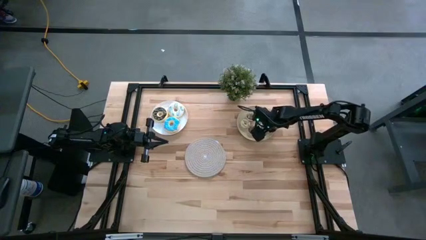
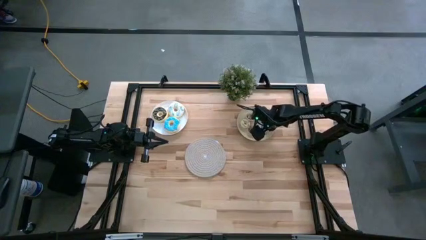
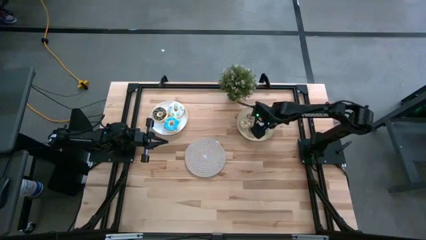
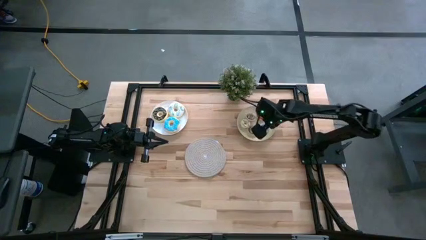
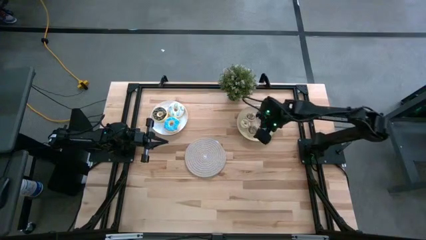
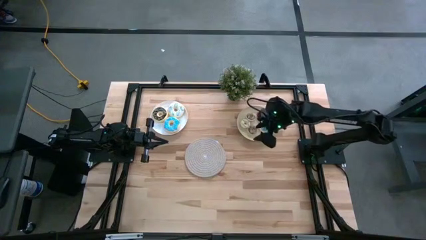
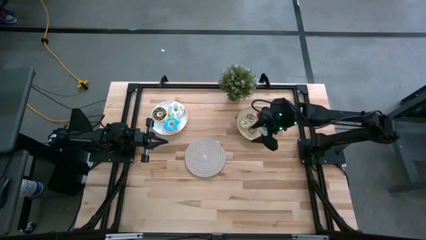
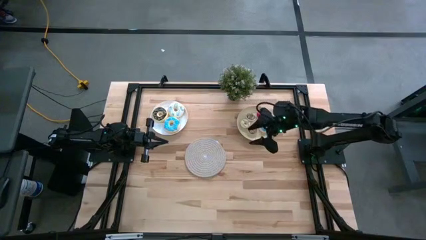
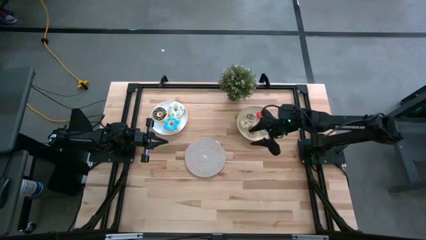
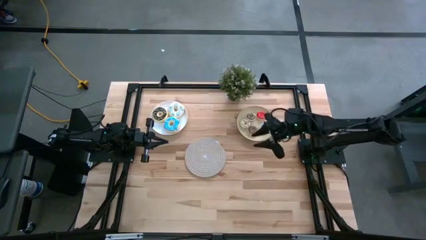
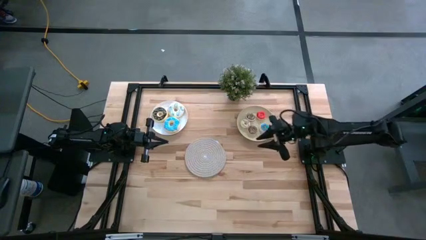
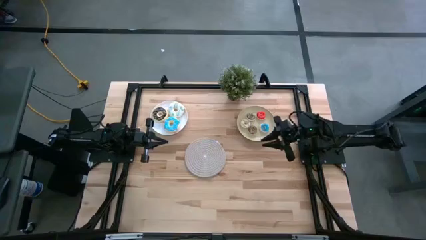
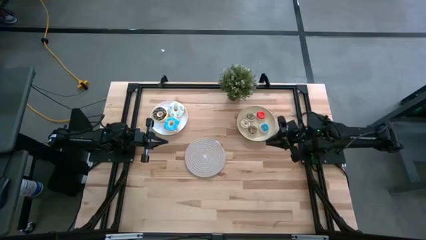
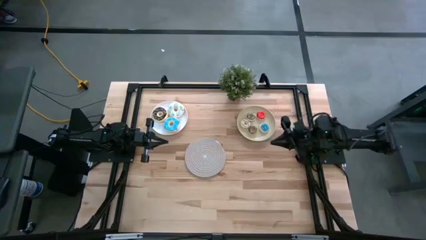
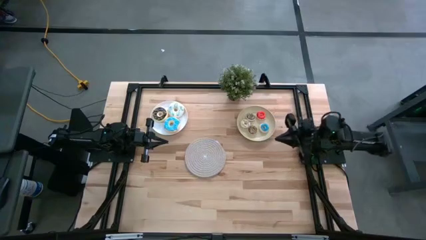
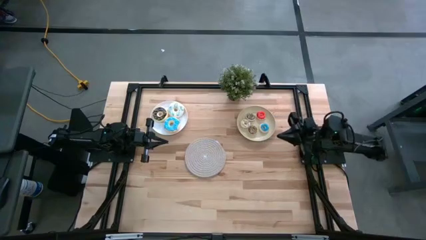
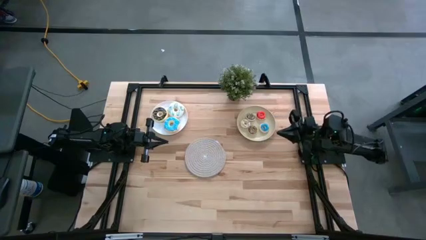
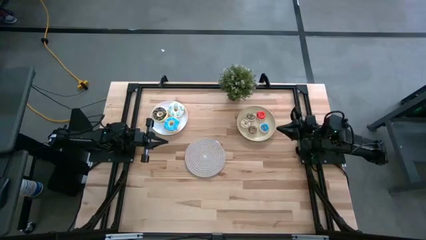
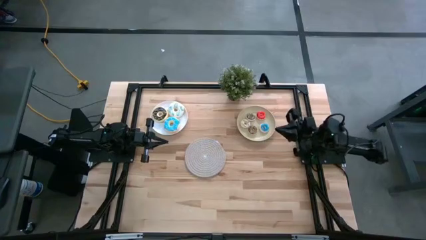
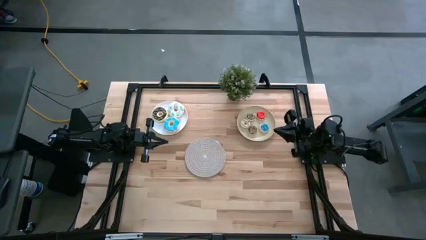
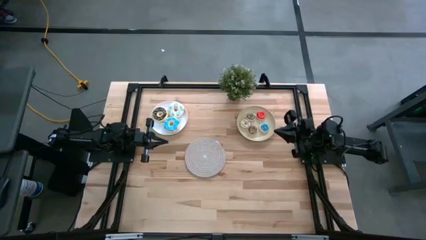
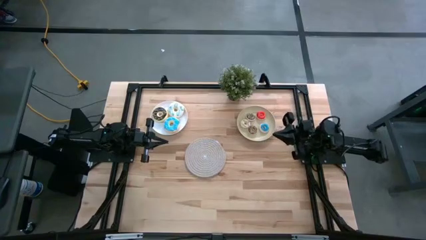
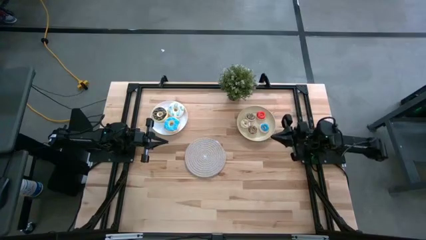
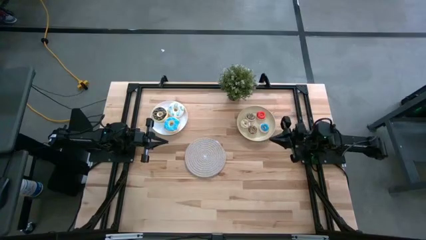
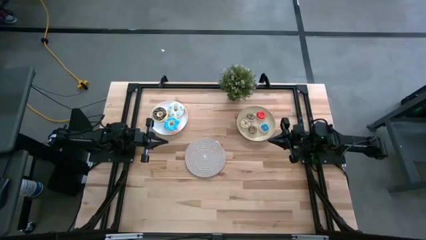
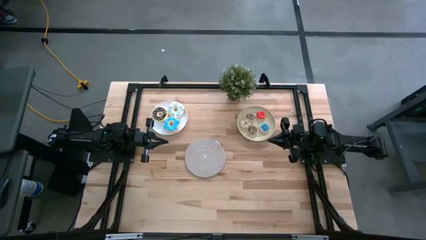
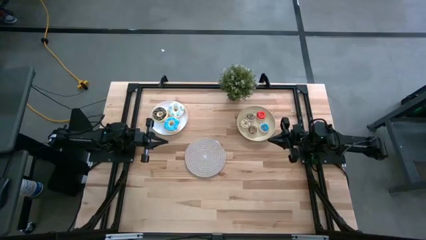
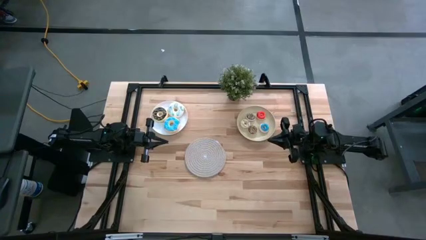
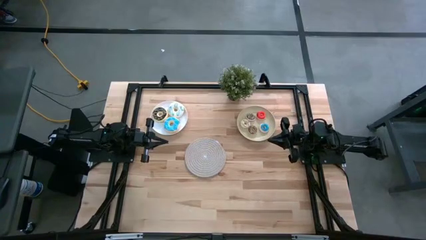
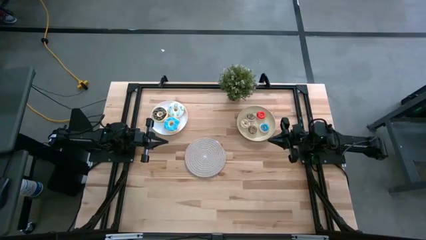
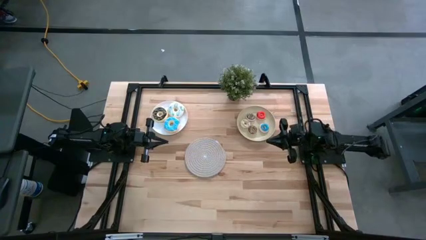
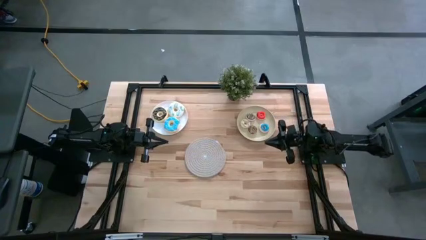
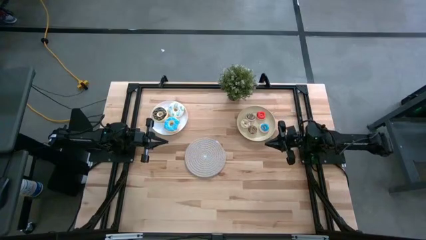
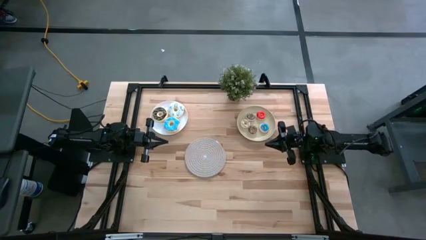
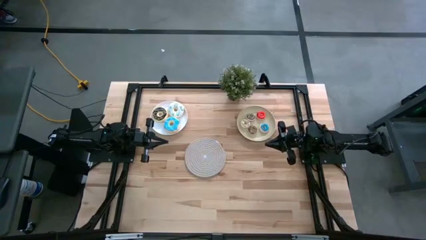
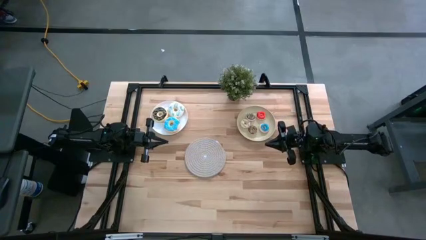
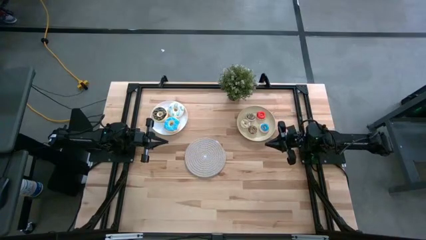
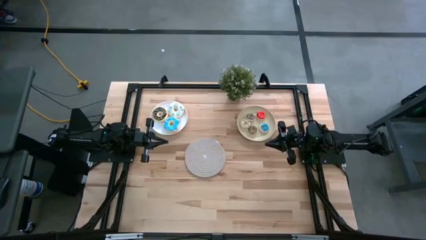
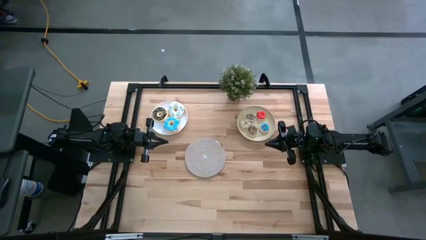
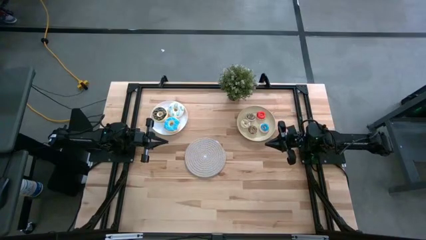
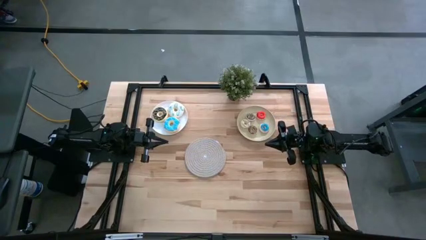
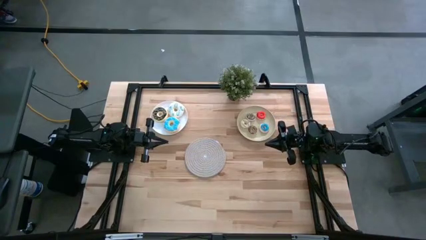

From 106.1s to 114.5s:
Task: Pick & Place donuts
Return to Home Position

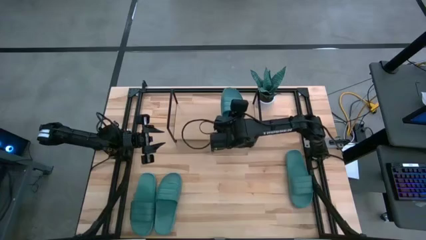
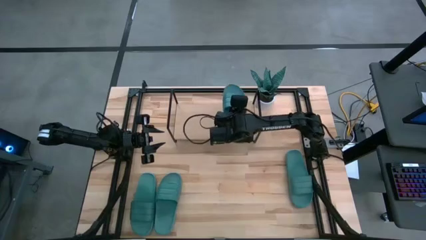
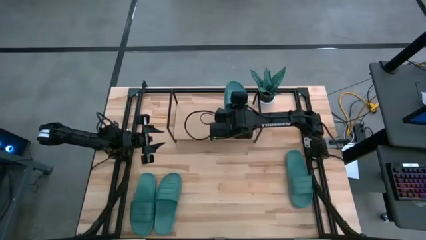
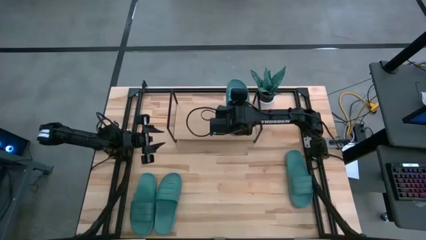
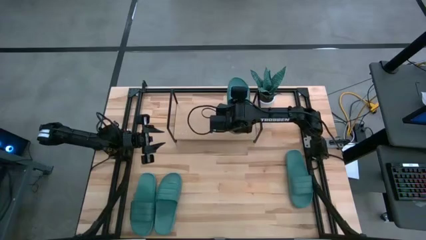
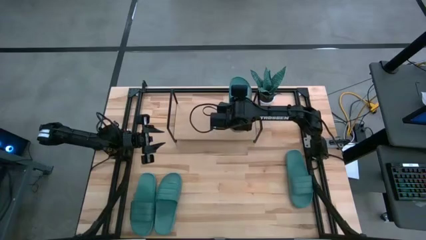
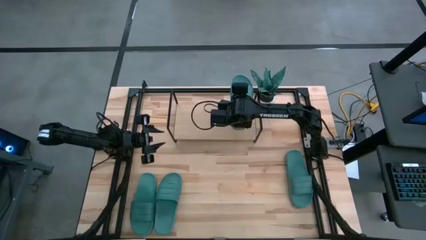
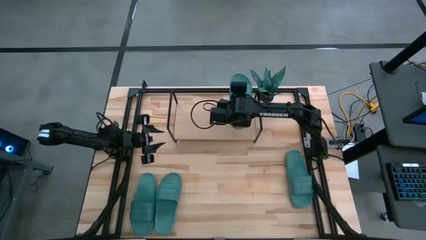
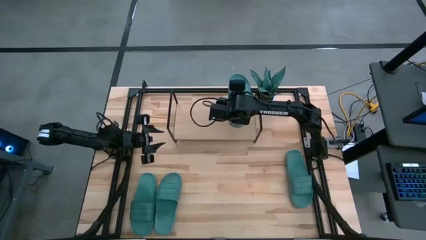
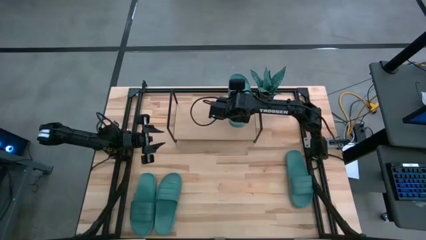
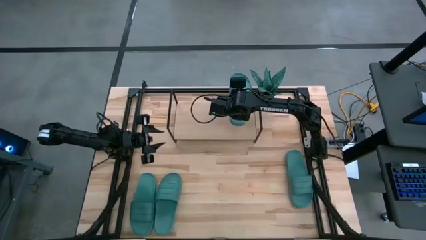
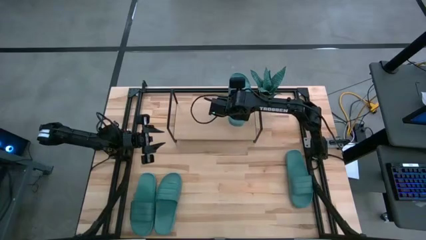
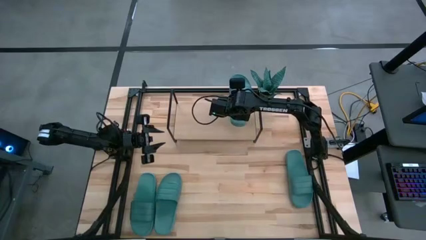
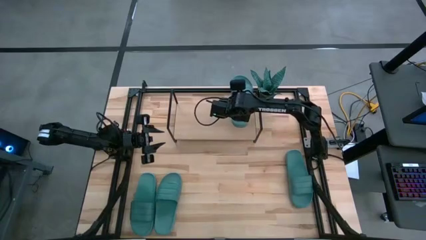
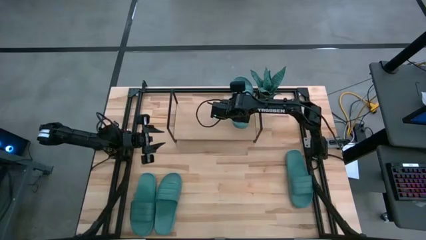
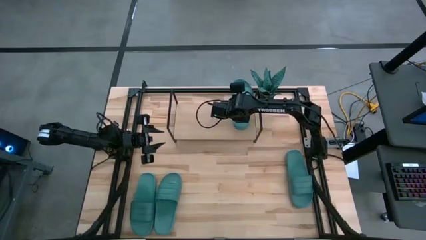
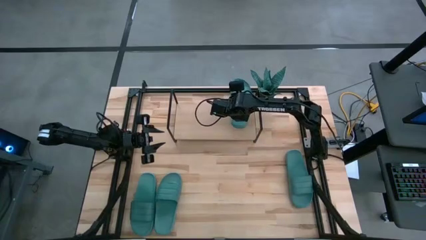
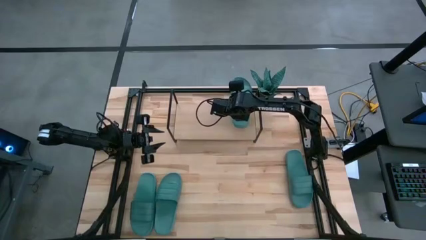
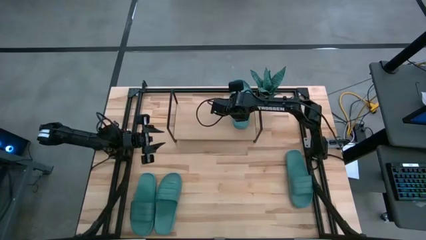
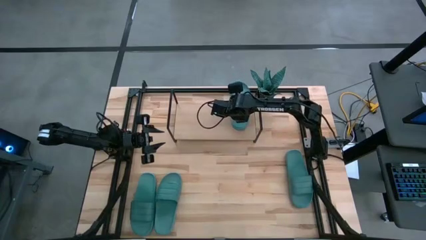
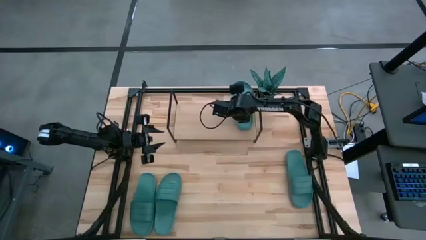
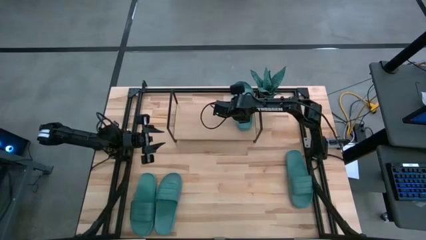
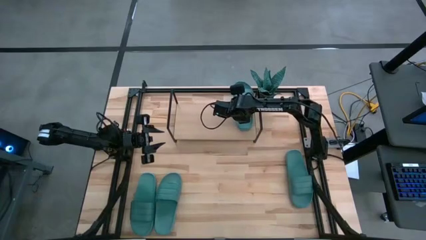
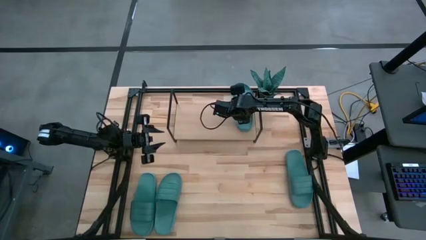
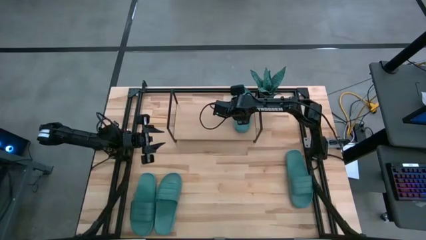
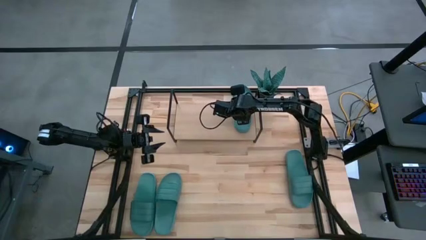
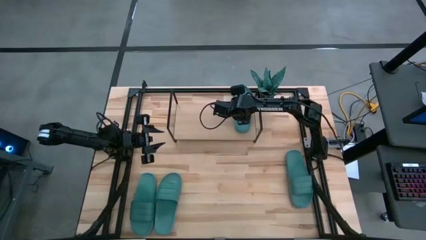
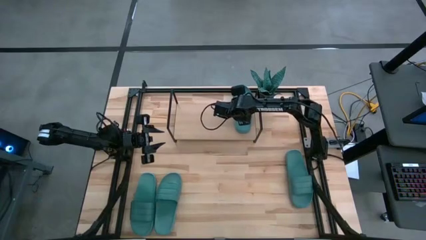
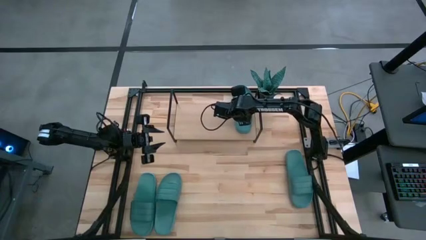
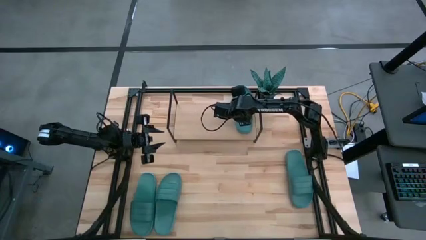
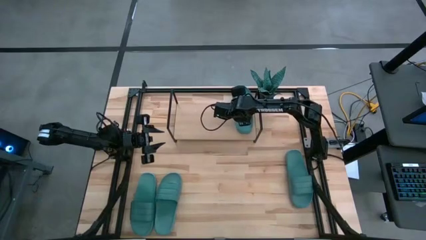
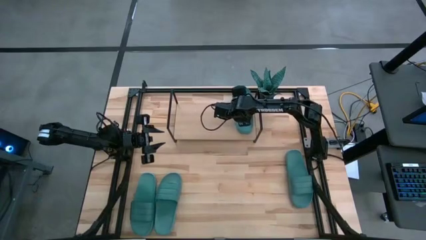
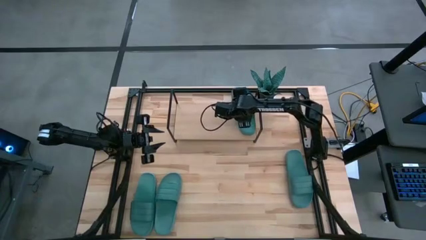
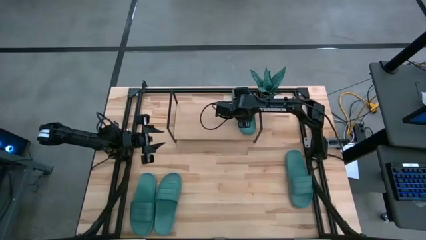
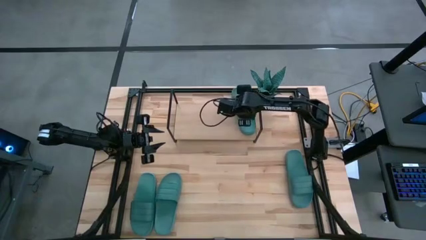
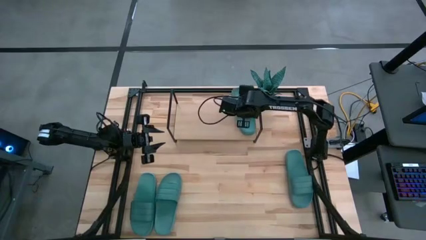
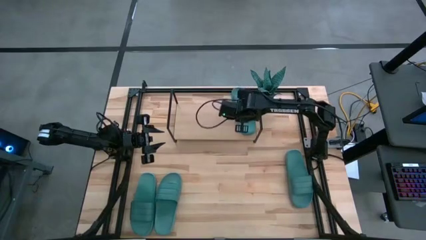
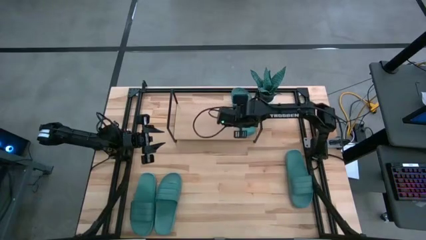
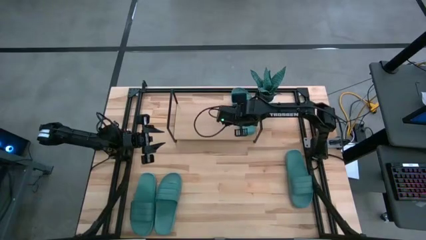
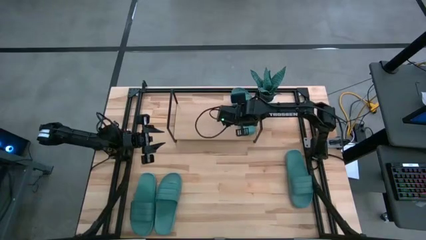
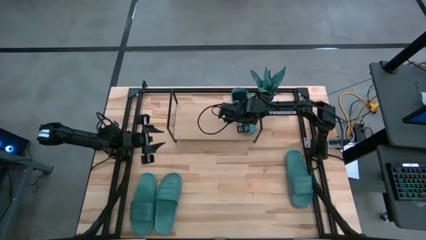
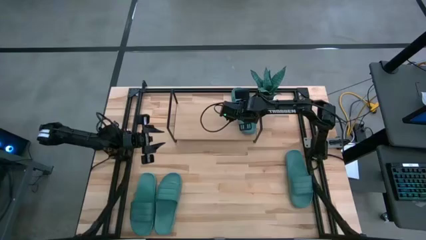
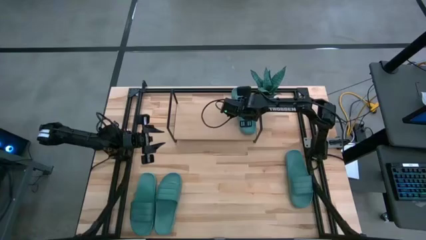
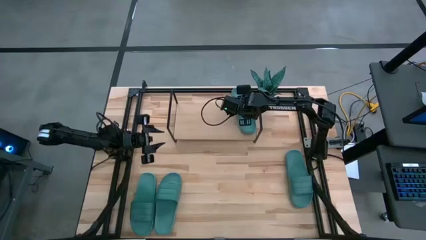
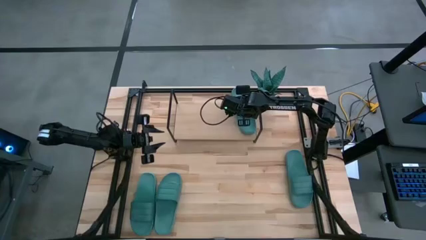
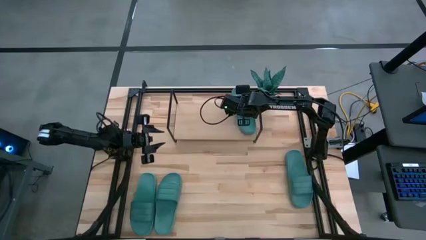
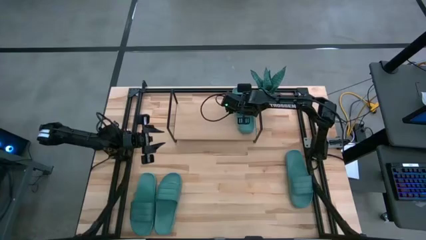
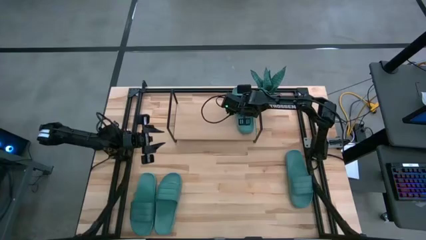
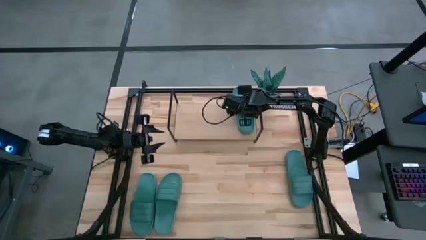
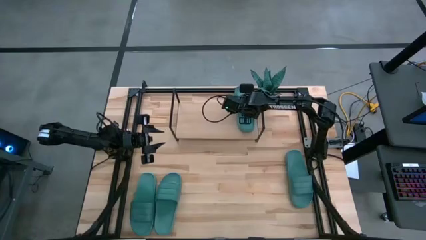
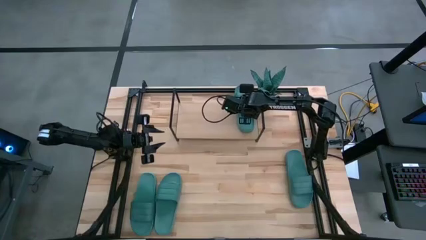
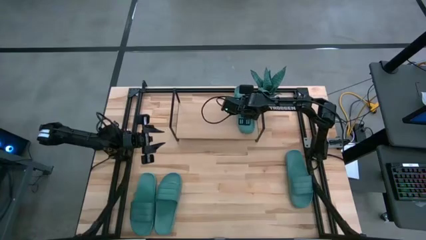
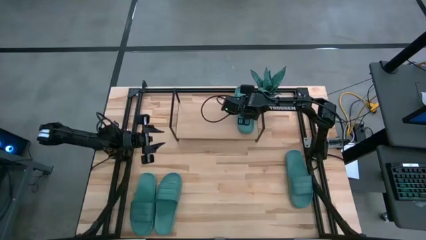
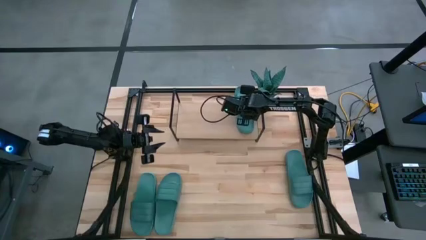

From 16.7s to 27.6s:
Task: Pick and place slides into the shelf
Put the green slipper on the shelf
